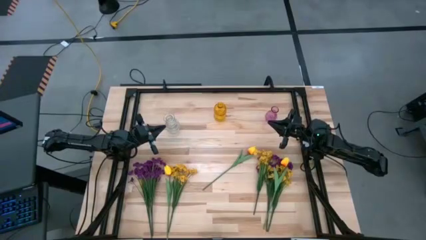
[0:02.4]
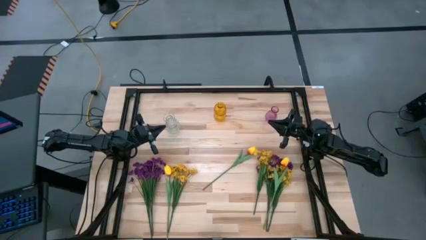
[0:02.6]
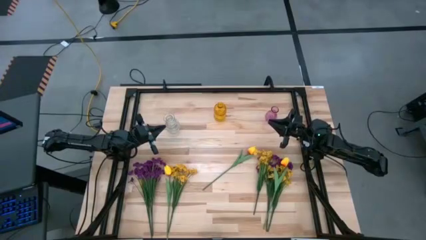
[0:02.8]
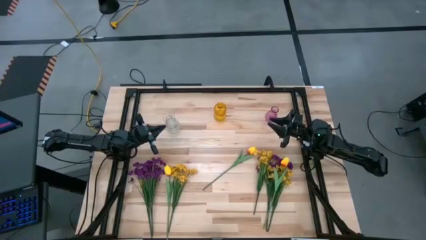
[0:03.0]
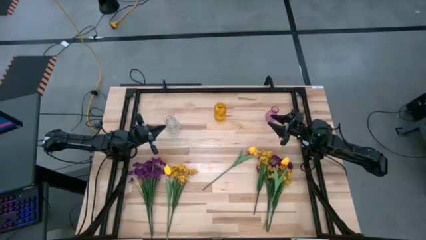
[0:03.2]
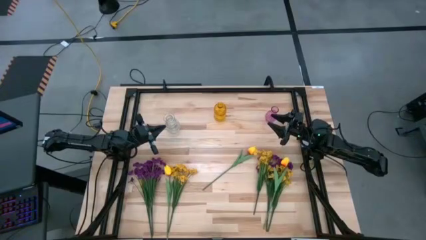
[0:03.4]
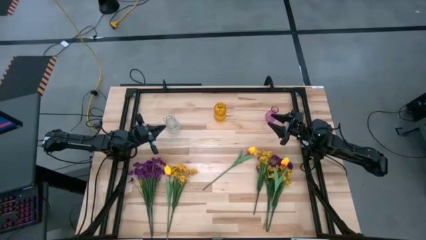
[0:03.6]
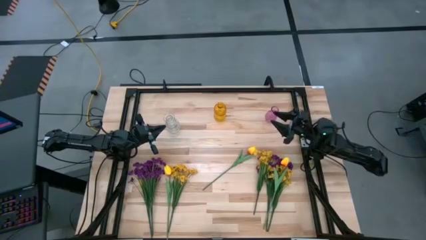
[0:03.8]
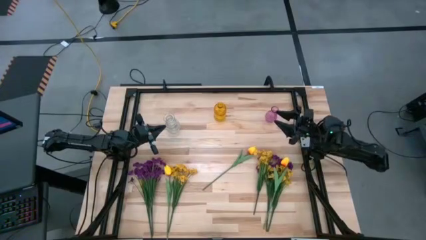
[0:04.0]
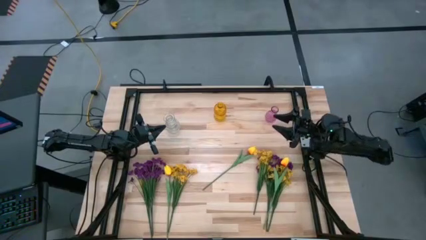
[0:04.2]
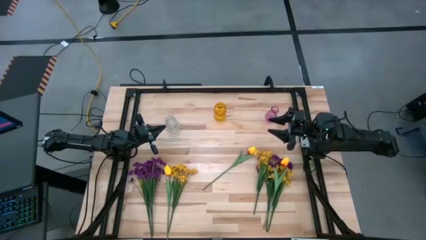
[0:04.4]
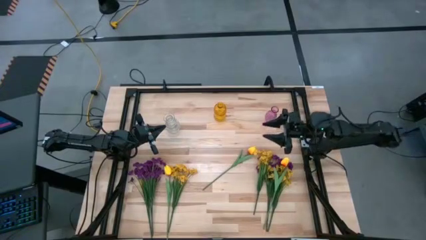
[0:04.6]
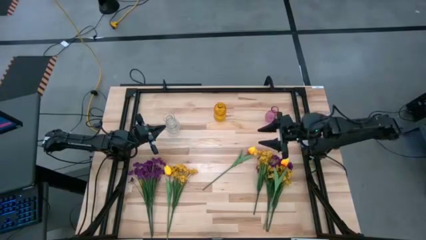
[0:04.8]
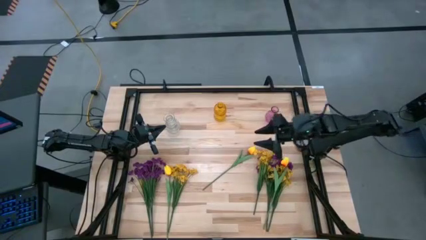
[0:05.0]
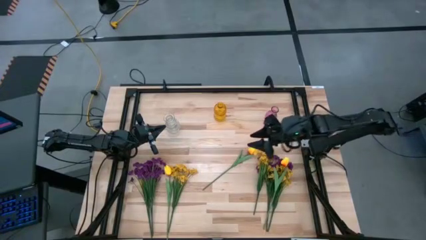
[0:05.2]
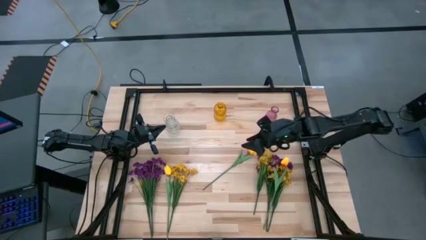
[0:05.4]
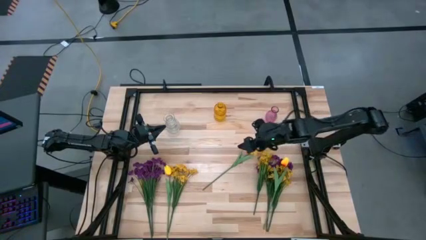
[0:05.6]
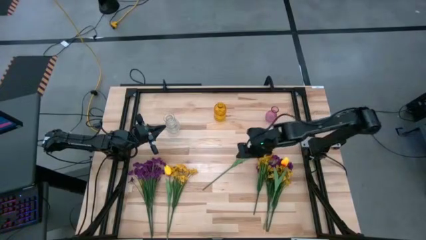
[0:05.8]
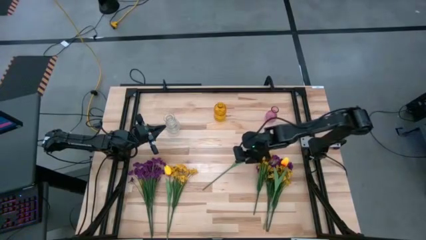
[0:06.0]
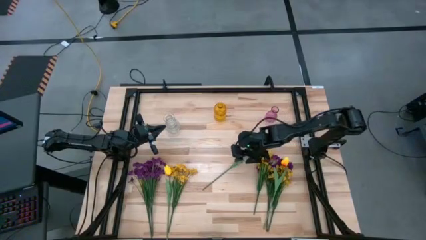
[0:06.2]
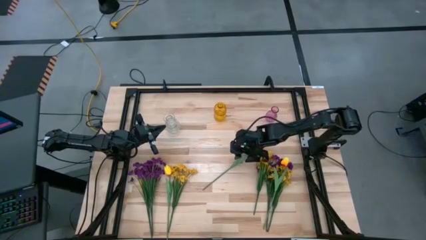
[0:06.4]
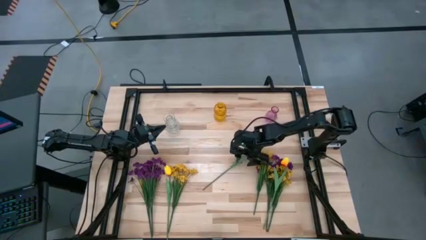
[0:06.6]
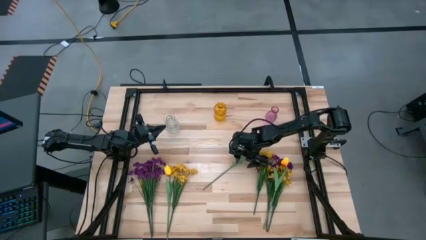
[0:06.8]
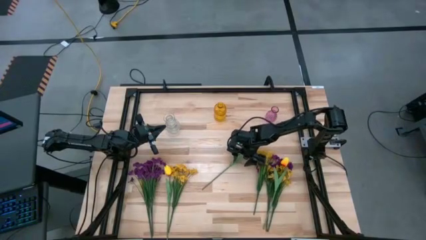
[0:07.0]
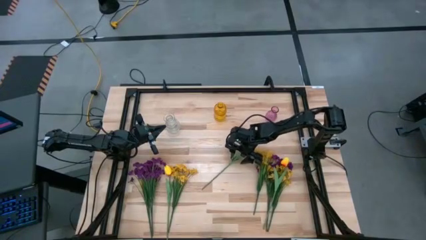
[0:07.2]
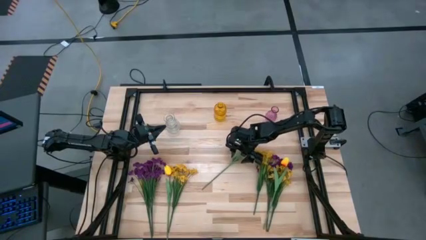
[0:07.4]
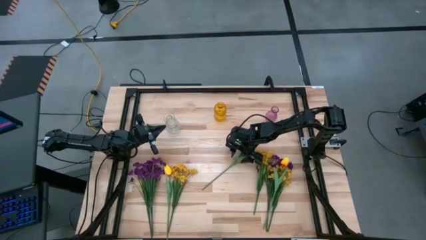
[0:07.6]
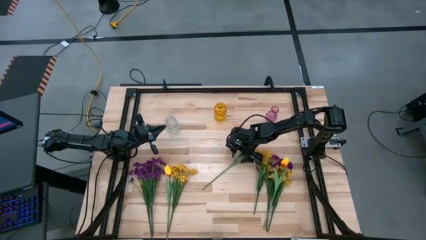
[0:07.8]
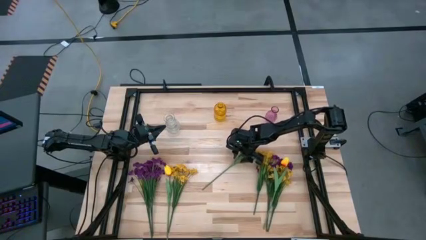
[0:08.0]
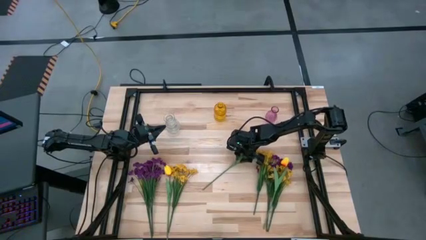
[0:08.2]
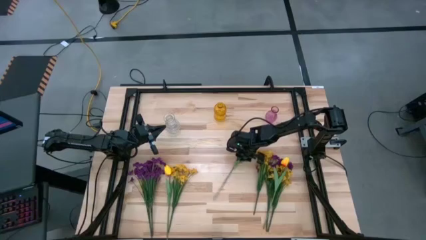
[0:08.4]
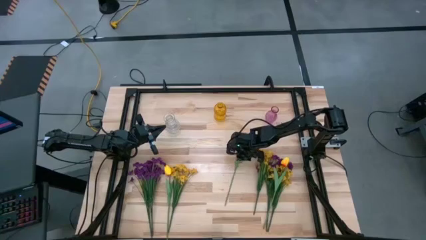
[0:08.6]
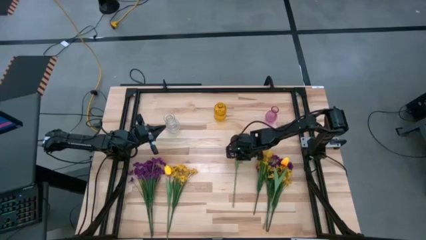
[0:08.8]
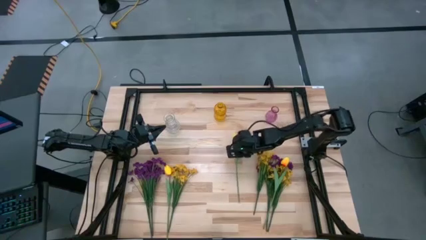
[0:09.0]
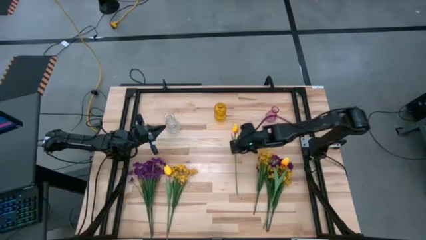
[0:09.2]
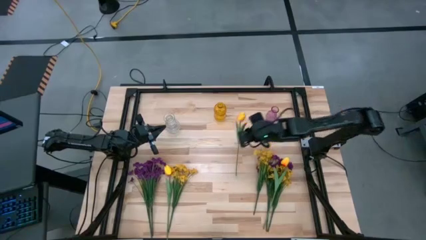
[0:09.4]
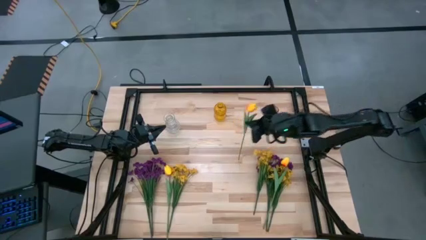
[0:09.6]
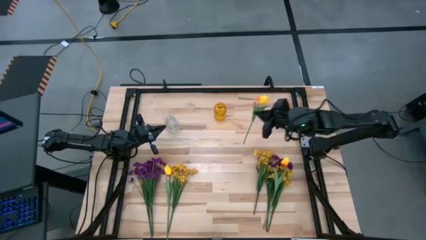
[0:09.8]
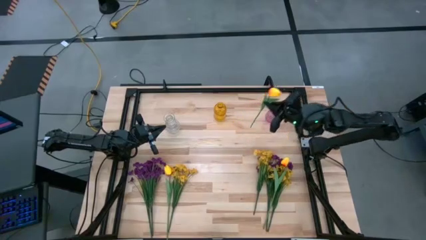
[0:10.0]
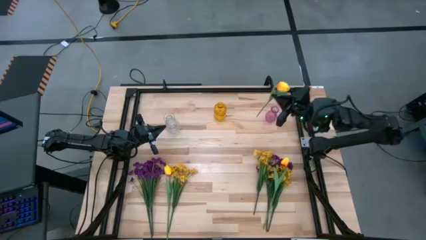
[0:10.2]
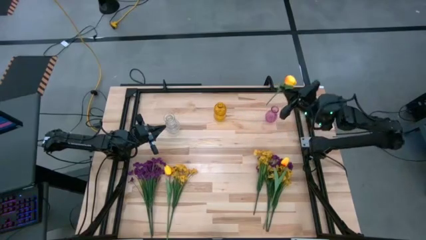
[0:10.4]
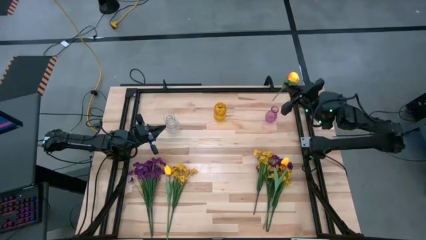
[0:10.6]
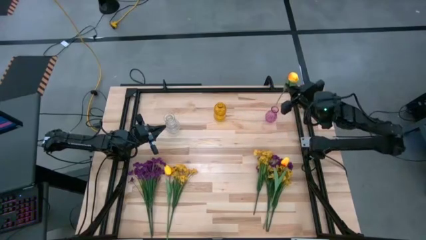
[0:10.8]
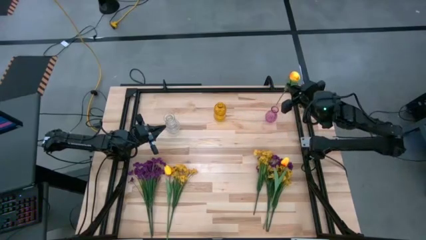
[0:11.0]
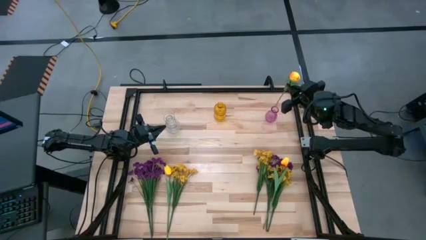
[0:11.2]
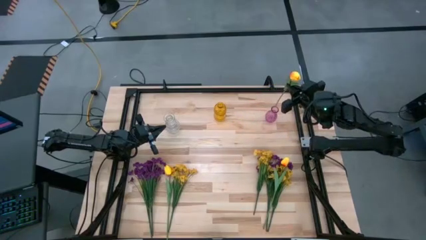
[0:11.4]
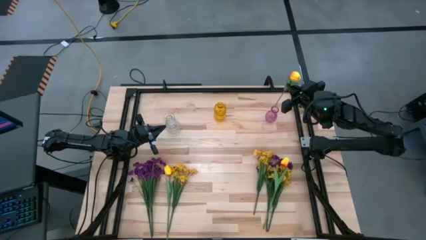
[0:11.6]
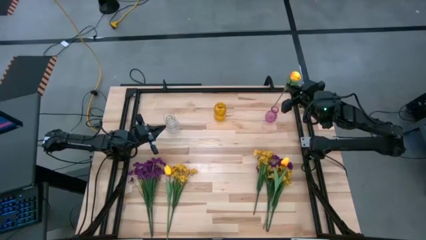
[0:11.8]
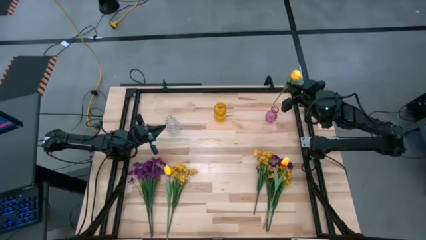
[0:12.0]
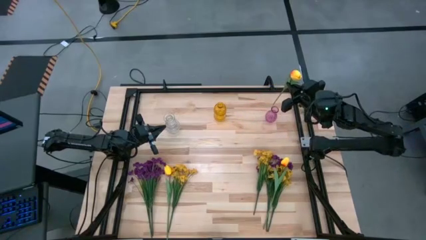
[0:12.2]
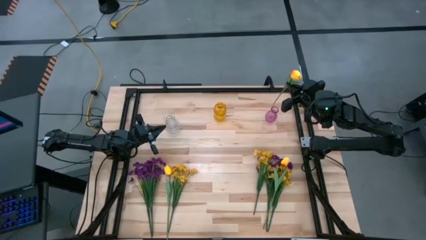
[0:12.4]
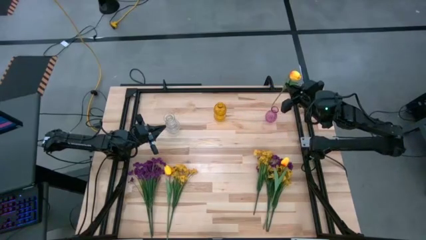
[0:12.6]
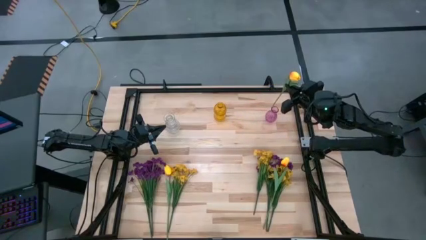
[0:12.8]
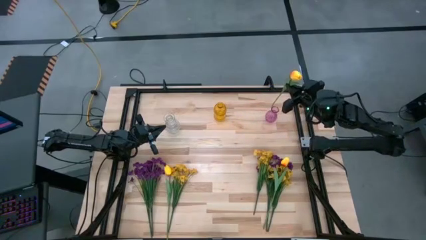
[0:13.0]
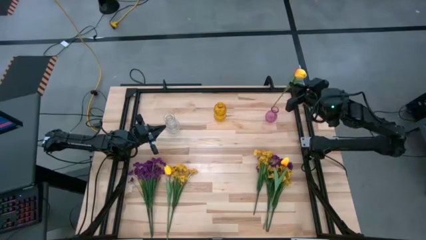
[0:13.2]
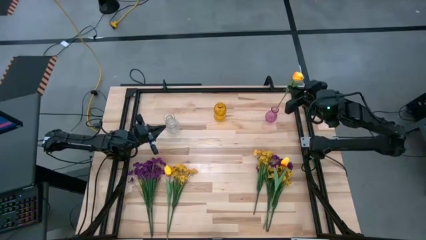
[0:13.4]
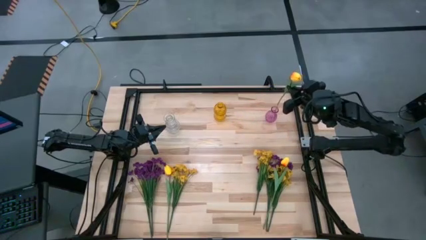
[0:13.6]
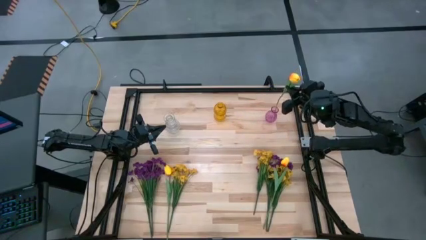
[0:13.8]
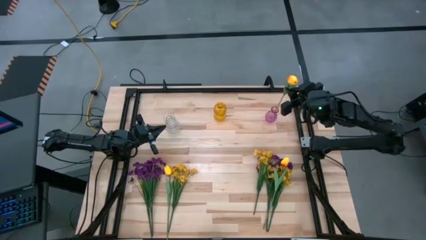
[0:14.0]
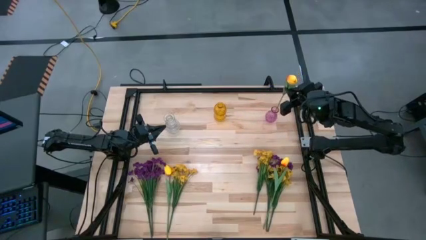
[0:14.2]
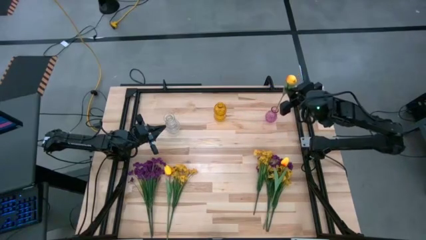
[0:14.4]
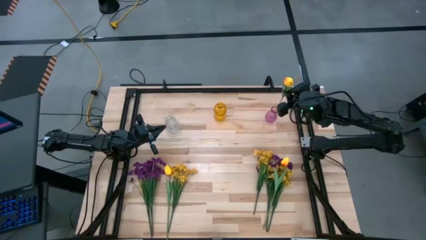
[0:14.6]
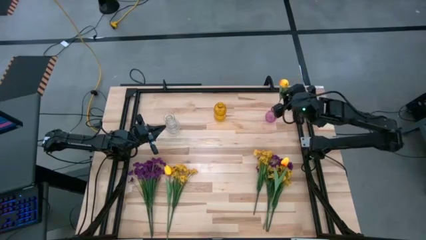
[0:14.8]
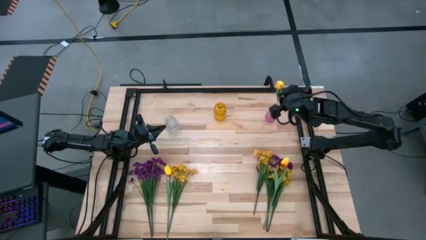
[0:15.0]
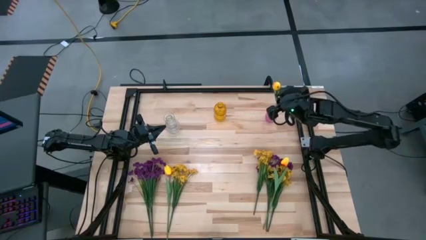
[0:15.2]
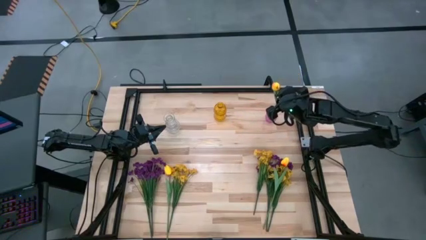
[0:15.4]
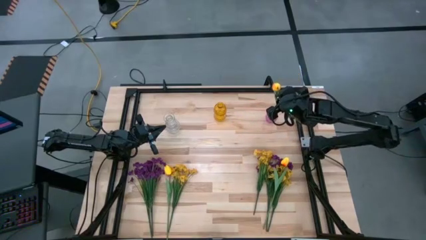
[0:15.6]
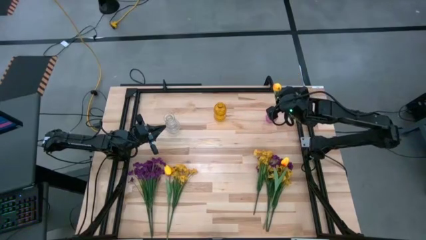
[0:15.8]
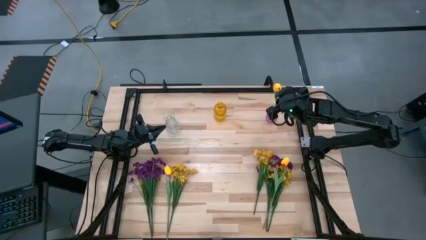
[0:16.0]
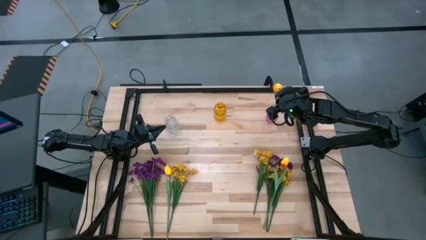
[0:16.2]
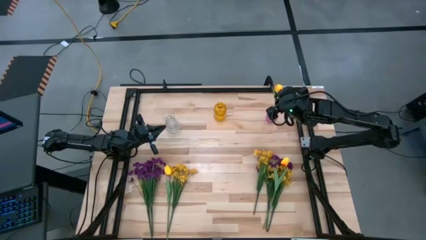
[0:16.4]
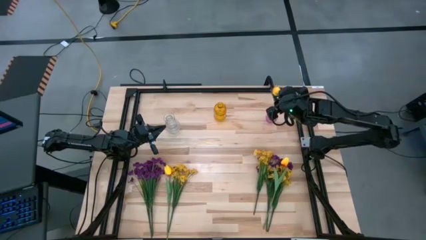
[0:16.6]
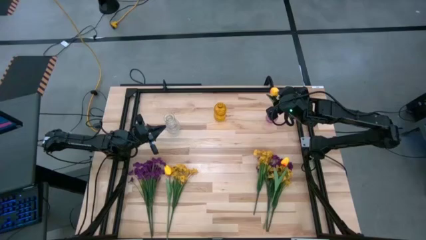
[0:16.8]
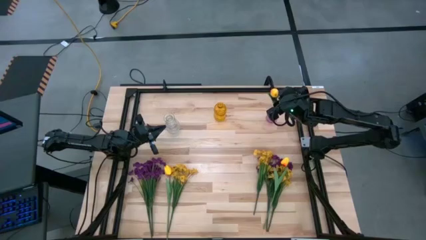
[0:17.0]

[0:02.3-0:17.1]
Task: Sort flowers into vase by color
Put the top orange flower into the purple vase
